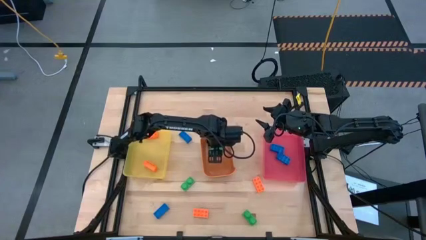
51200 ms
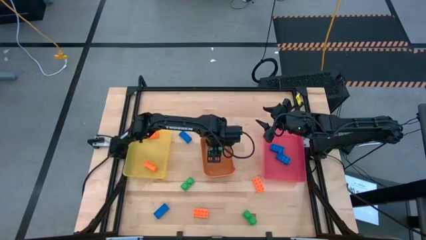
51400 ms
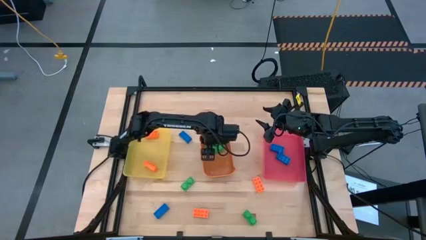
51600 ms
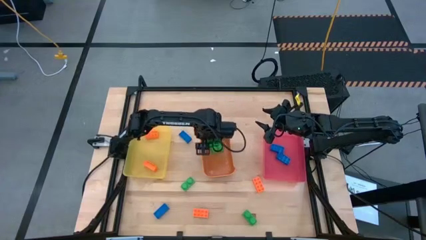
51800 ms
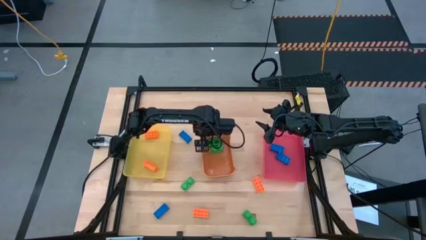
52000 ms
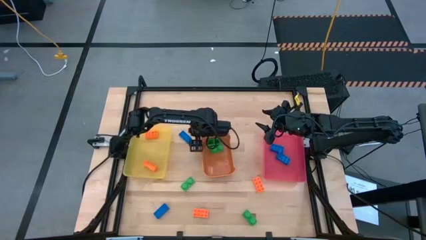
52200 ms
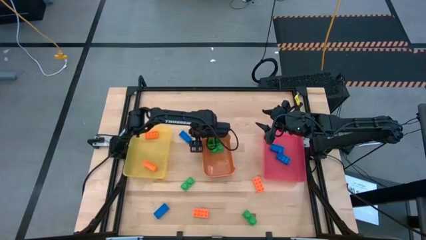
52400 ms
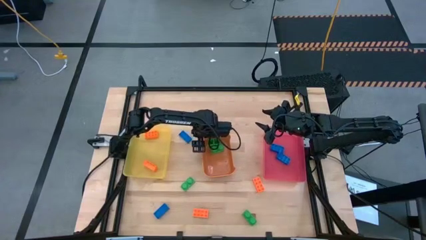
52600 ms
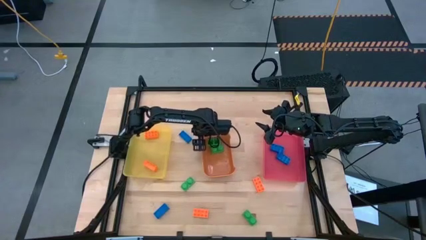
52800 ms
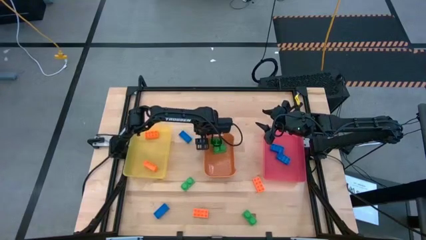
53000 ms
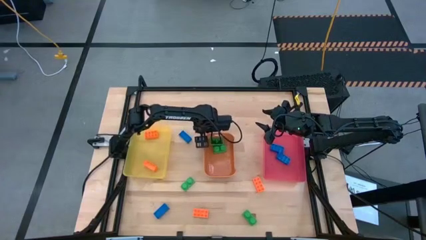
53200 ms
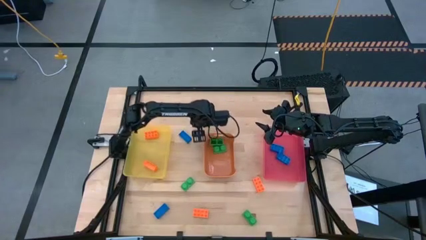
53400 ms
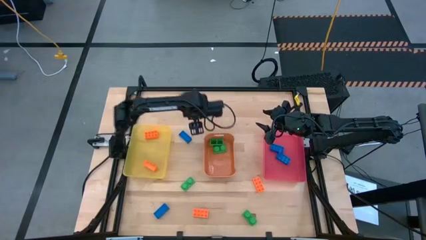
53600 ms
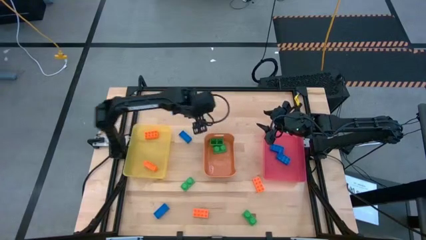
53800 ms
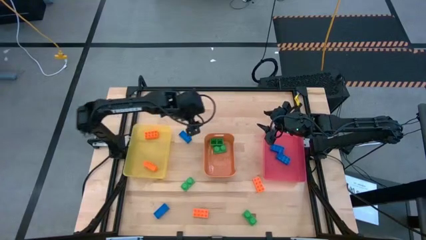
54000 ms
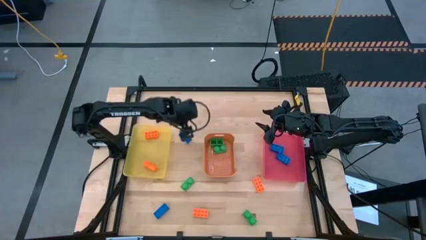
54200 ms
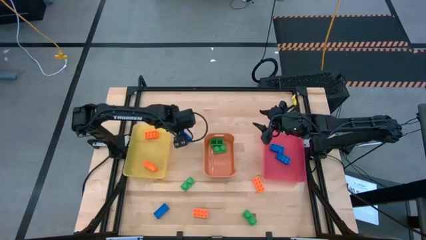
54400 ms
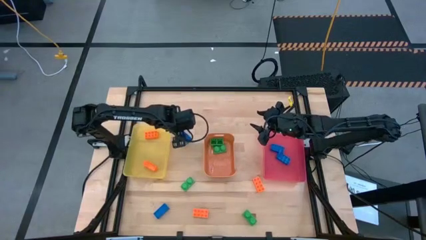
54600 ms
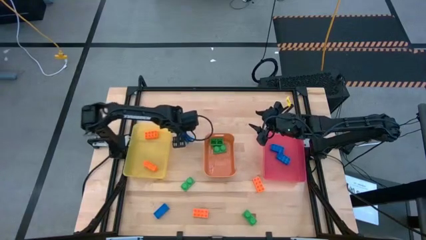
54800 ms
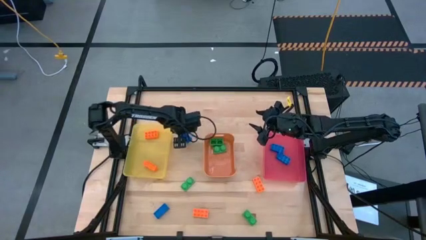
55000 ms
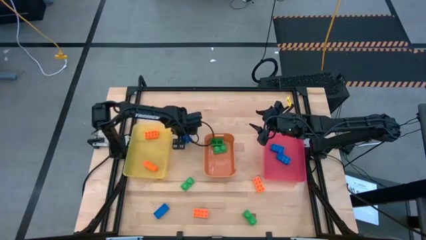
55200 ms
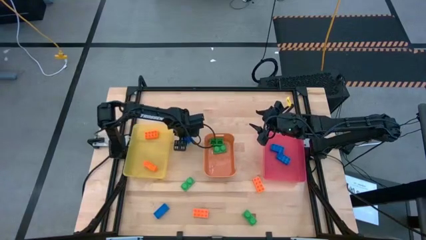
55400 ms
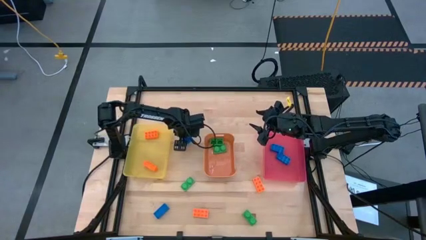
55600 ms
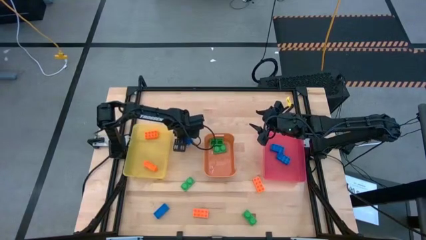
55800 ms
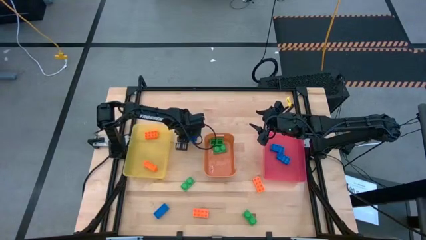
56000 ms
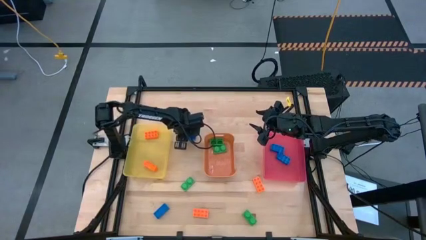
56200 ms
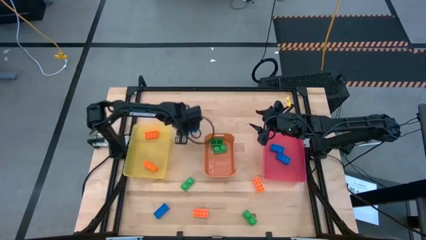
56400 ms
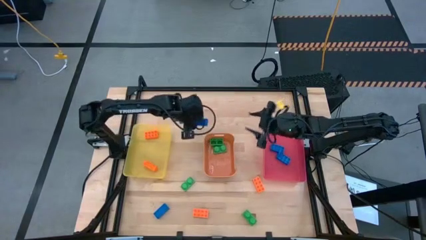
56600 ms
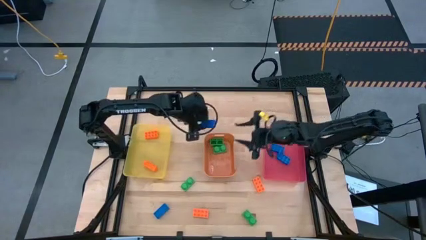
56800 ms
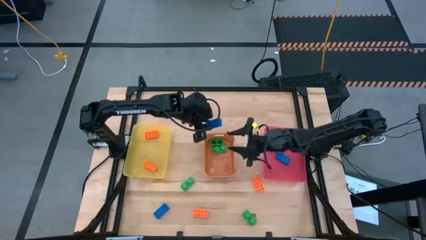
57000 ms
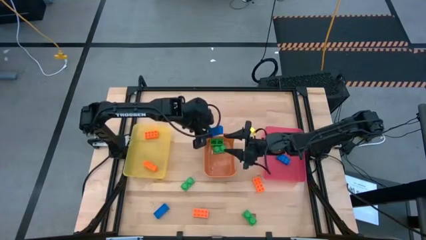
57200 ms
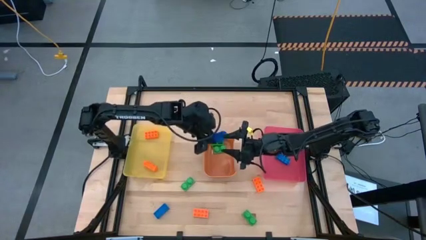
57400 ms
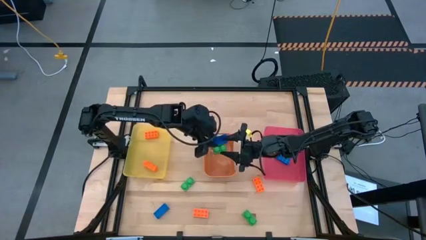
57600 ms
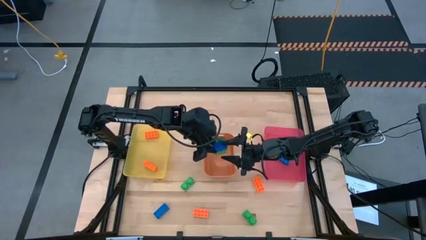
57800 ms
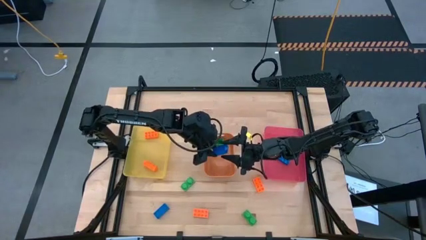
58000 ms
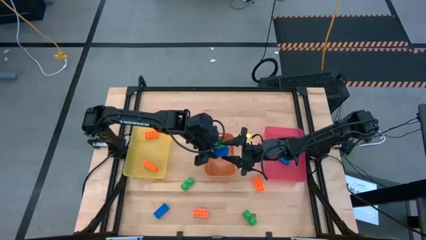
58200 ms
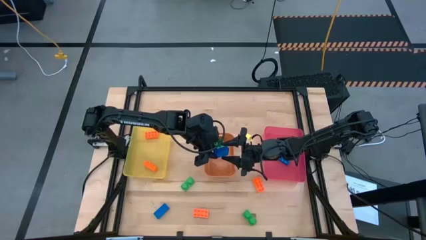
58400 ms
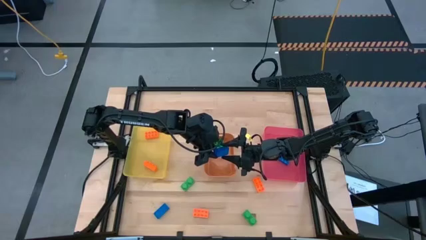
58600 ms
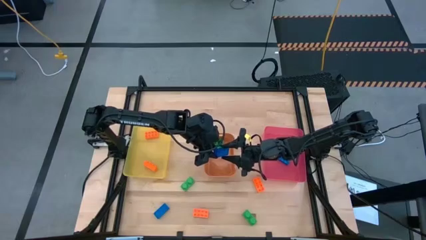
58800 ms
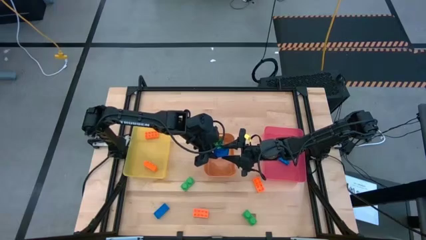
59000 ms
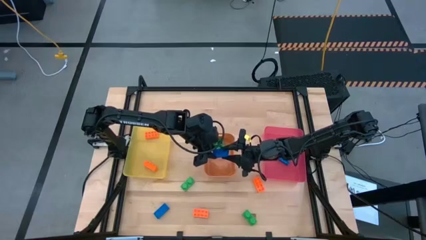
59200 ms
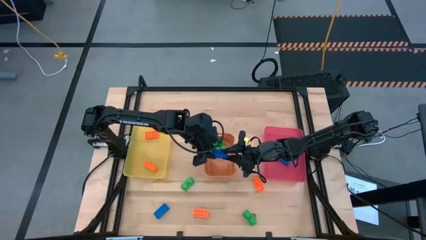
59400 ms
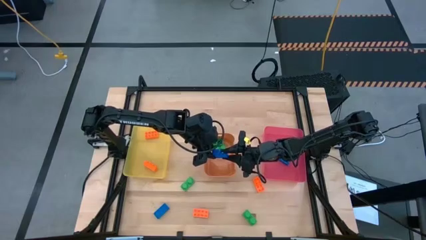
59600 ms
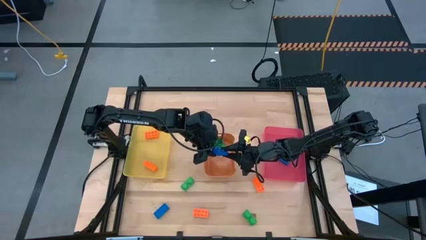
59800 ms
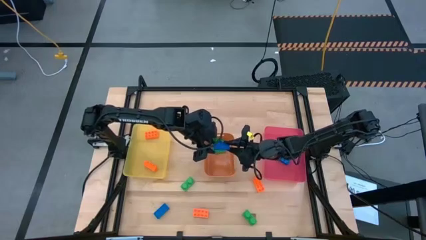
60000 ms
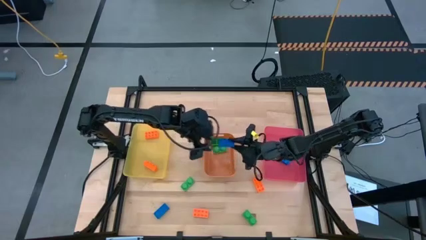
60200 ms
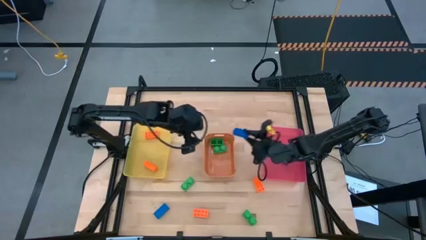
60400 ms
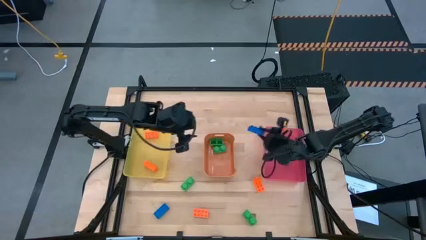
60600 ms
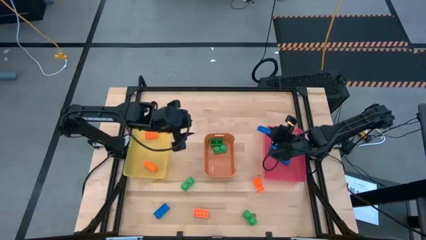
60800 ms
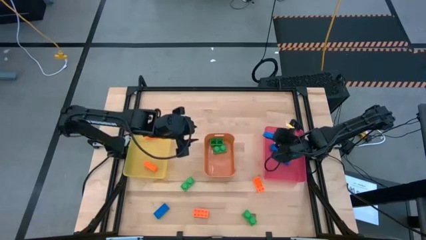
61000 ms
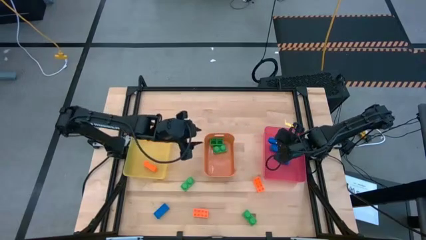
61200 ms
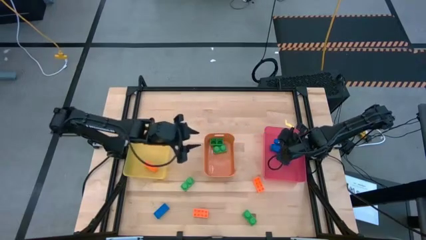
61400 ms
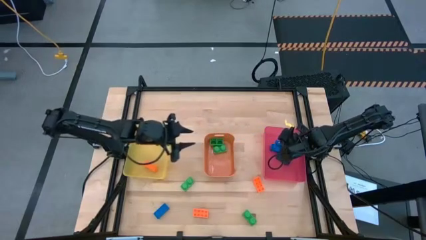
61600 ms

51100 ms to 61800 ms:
Task: Sort & place blocks by color
Put the blue game piece into the pink bin

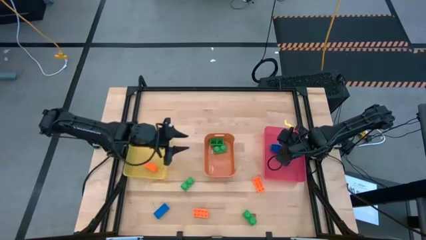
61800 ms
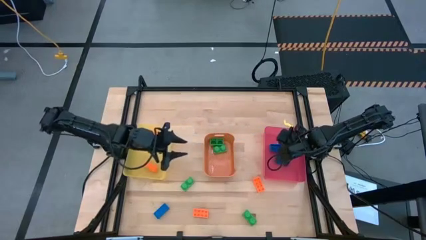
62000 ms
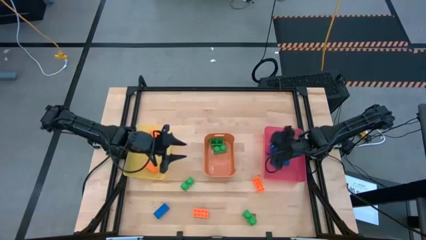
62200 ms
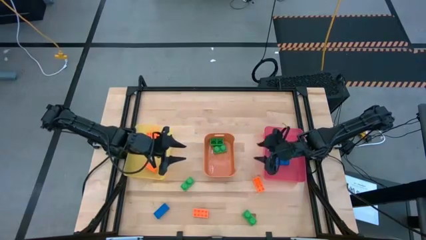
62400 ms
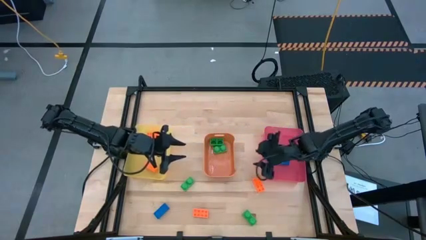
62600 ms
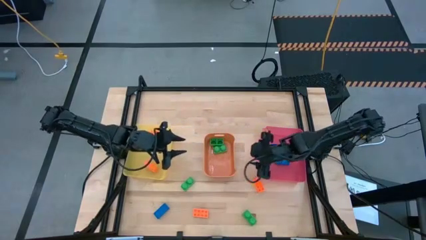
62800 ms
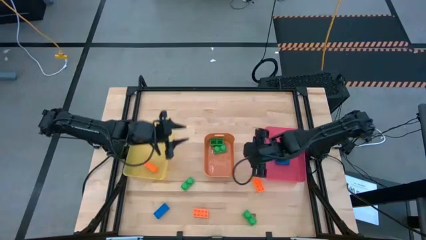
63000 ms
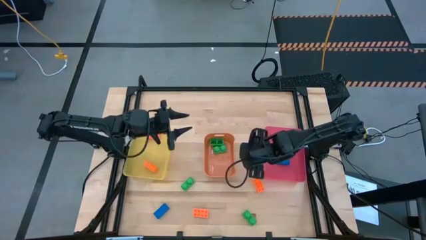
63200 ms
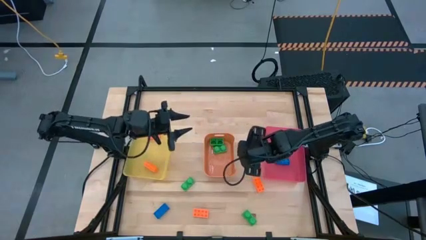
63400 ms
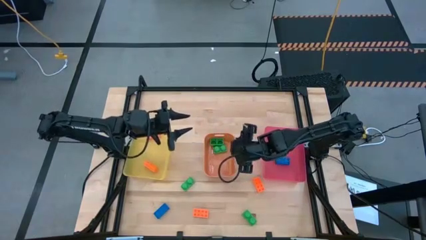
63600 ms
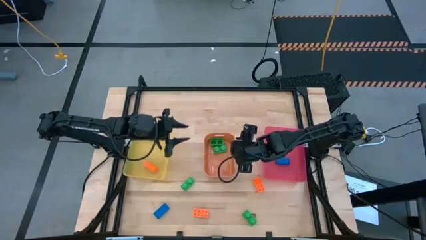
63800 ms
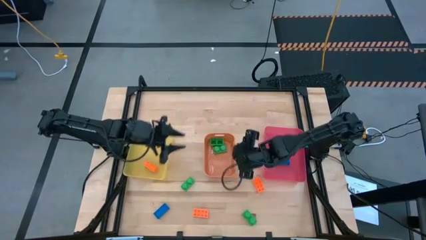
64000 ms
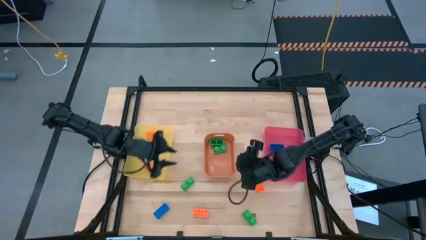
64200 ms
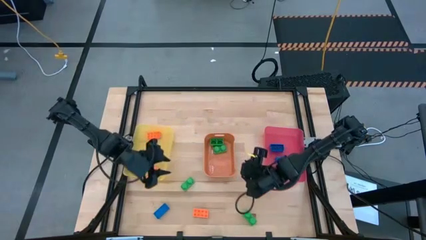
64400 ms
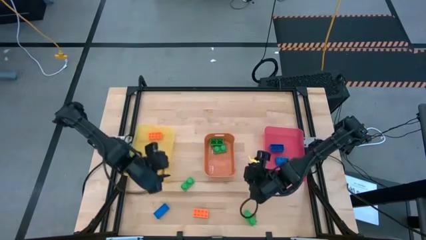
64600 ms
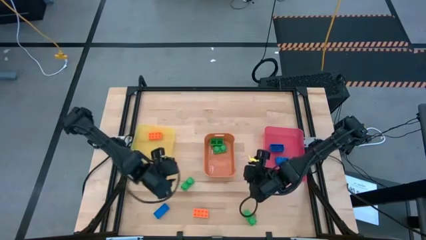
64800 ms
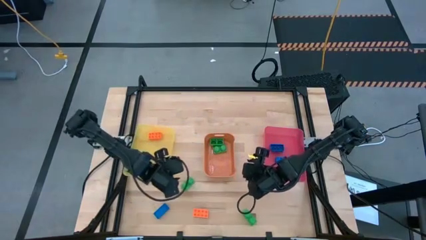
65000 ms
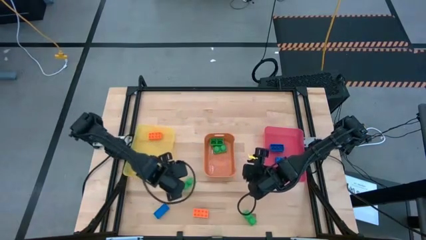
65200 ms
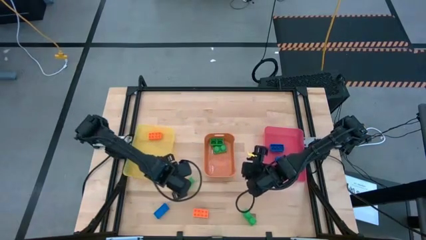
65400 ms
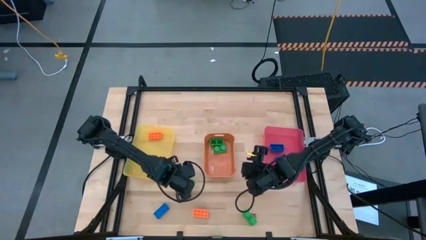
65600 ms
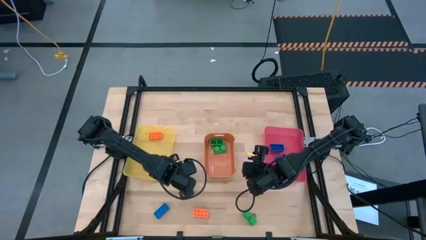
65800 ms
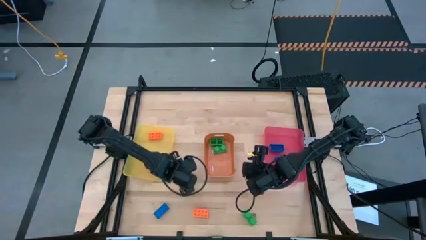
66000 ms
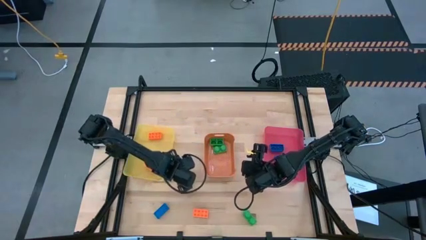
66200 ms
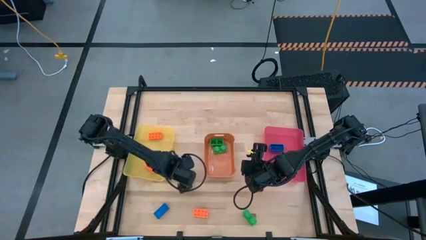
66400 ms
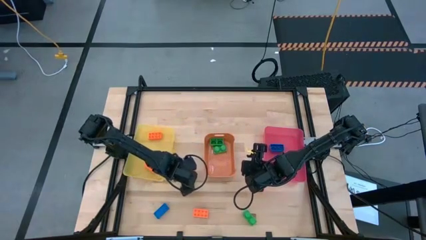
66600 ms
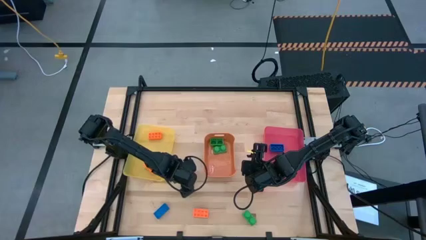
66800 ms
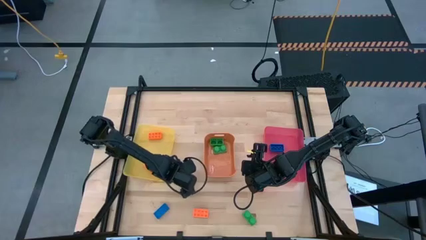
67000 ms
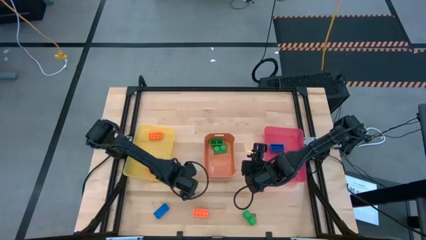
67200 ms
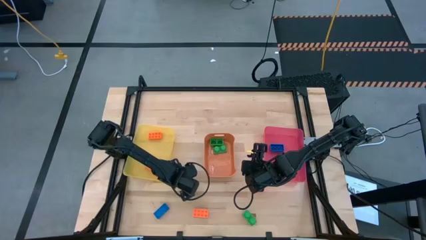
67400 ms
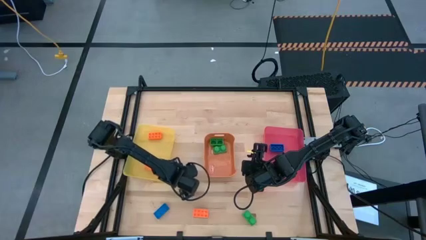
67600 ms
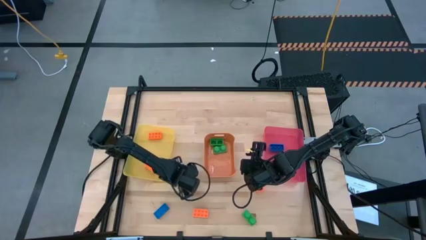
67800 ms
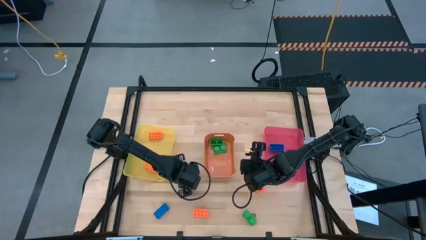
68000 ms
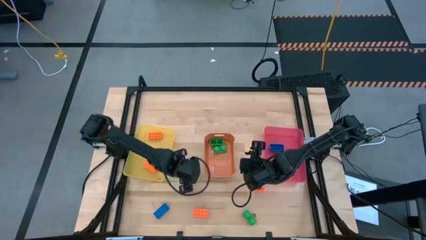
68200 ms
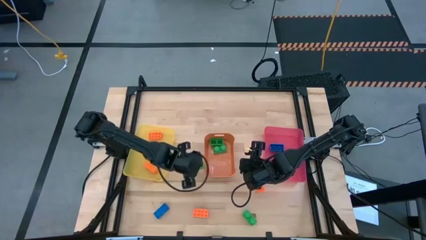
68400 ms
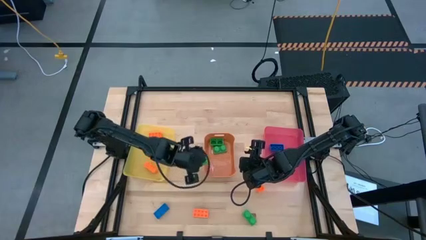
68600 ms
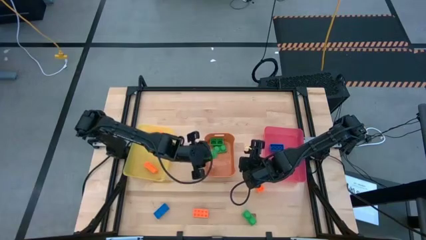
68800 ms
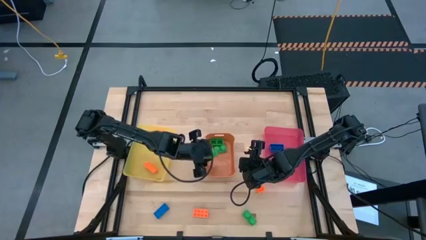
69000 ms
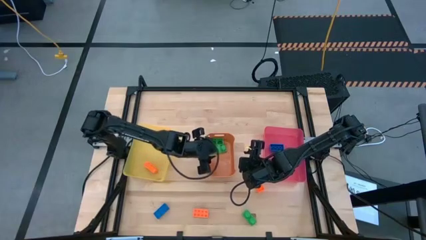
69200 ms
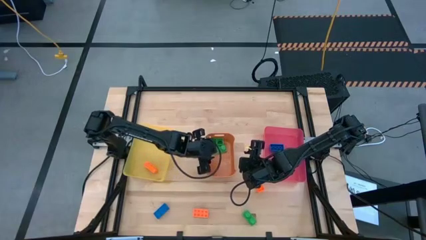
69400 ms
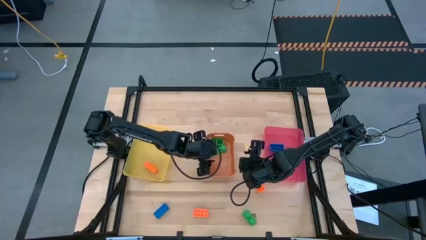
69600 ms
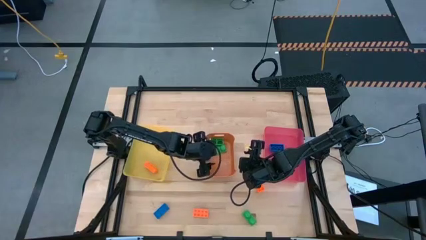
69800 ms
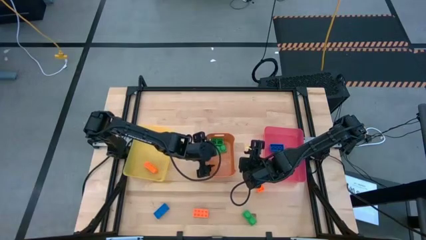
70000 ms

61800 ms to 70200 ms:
Put the green game piece into the orange bin
